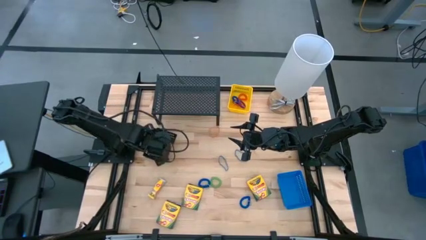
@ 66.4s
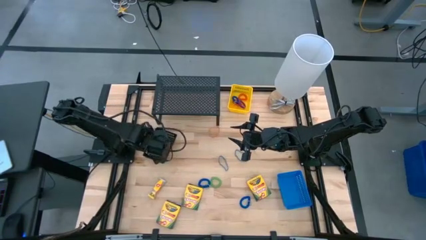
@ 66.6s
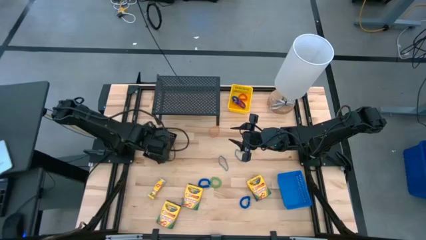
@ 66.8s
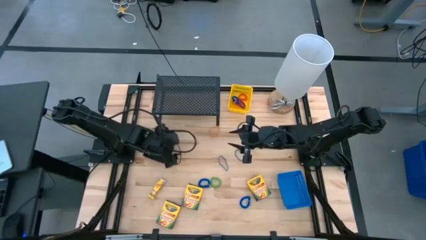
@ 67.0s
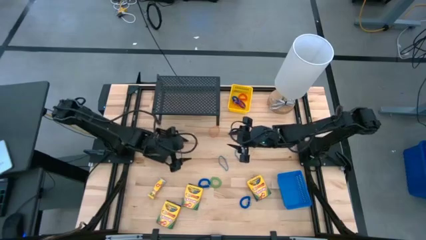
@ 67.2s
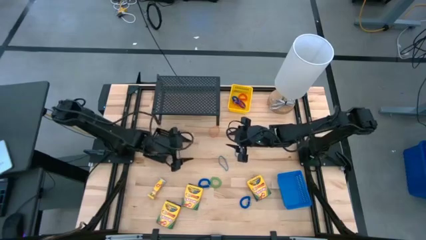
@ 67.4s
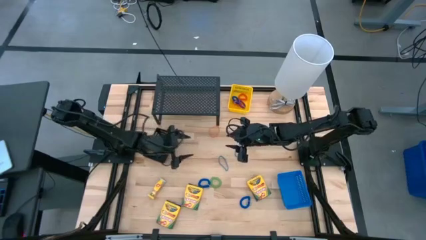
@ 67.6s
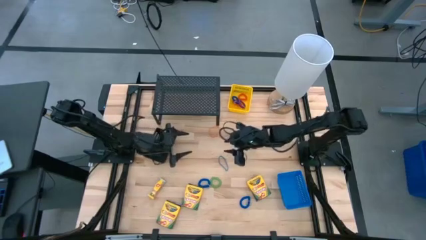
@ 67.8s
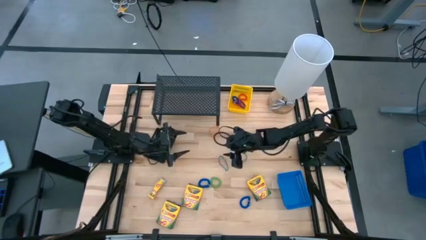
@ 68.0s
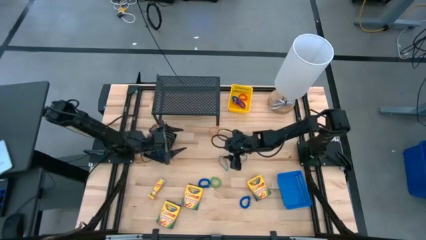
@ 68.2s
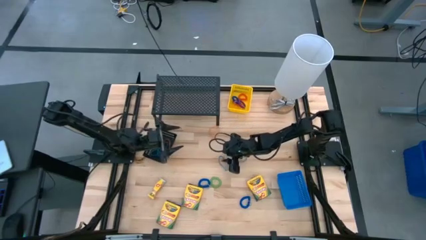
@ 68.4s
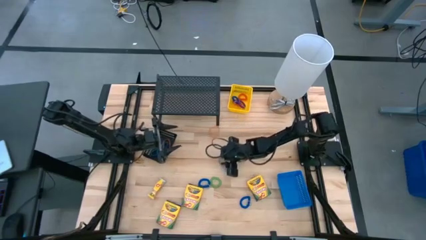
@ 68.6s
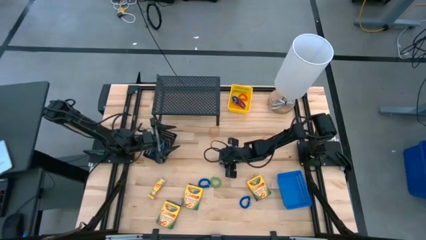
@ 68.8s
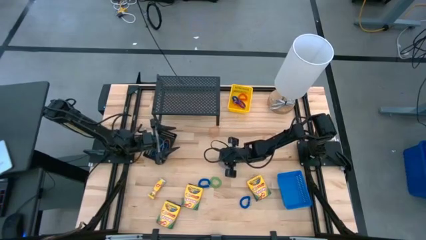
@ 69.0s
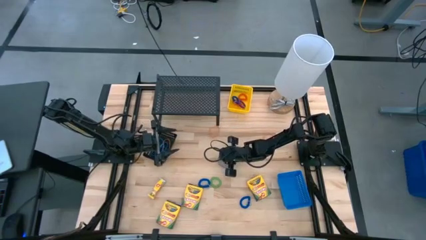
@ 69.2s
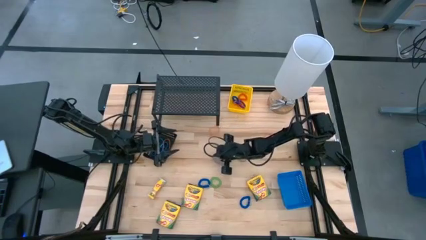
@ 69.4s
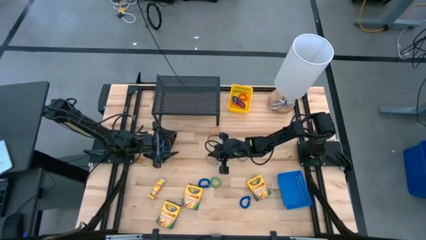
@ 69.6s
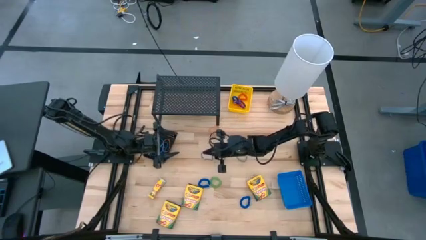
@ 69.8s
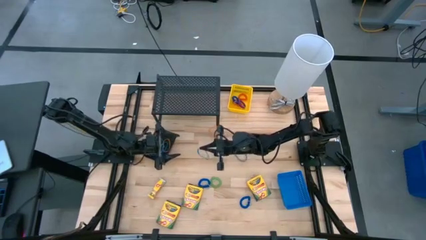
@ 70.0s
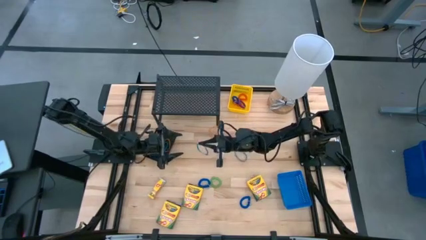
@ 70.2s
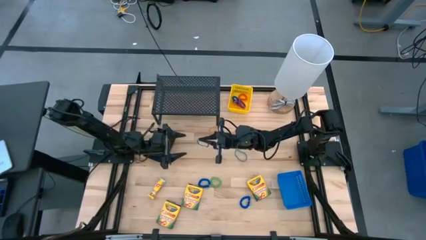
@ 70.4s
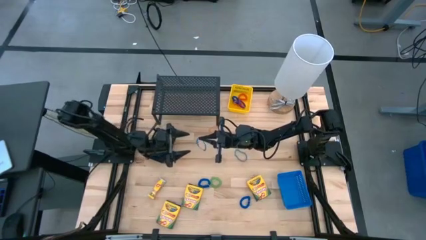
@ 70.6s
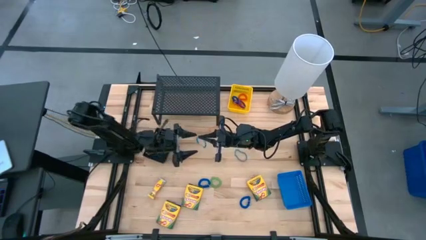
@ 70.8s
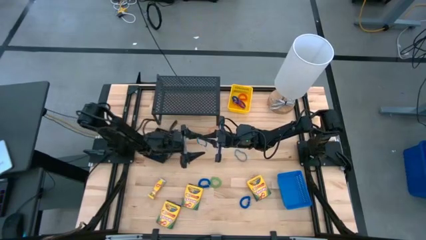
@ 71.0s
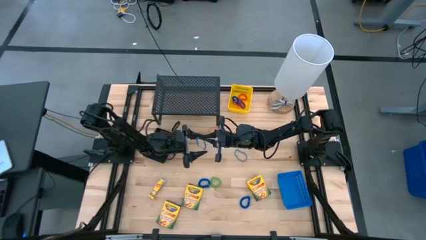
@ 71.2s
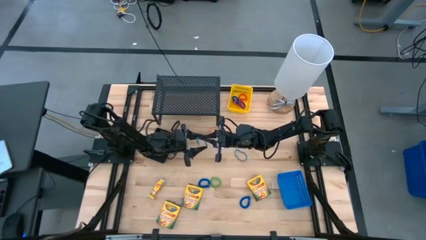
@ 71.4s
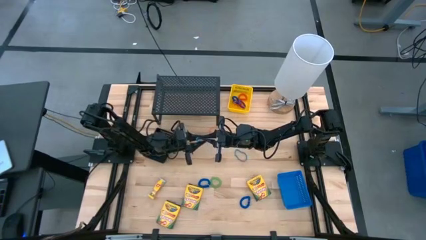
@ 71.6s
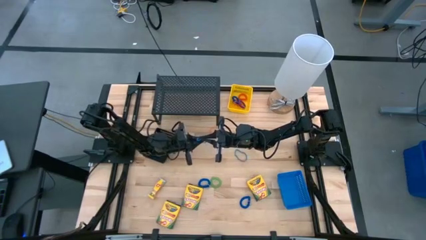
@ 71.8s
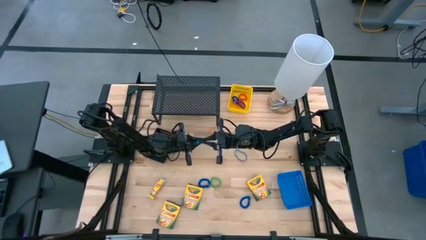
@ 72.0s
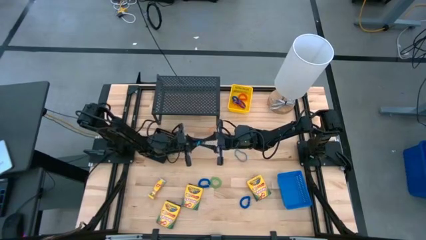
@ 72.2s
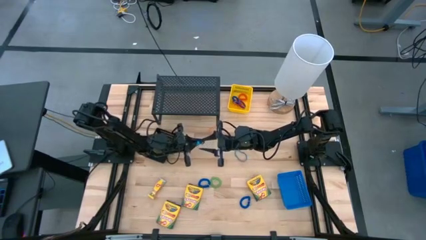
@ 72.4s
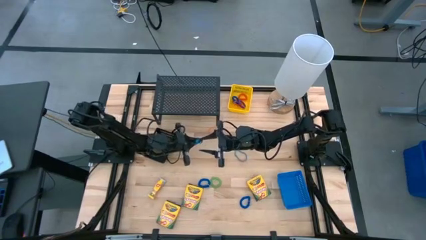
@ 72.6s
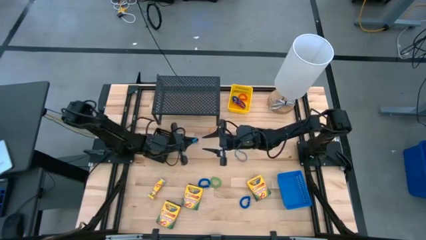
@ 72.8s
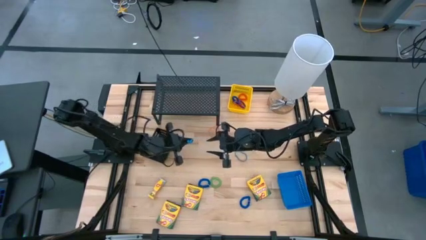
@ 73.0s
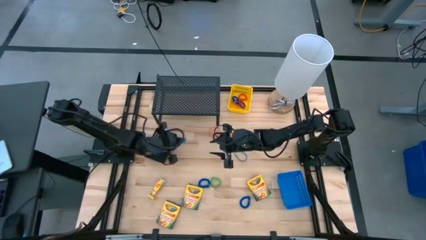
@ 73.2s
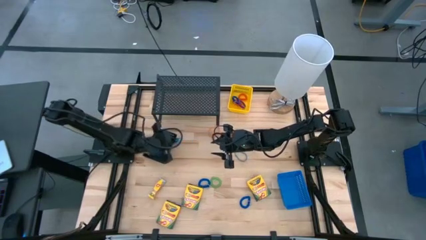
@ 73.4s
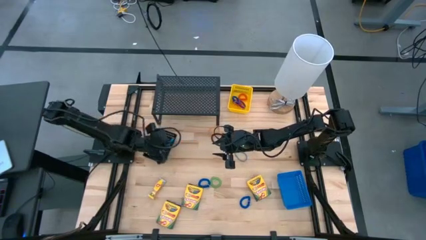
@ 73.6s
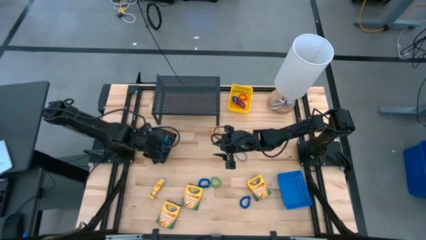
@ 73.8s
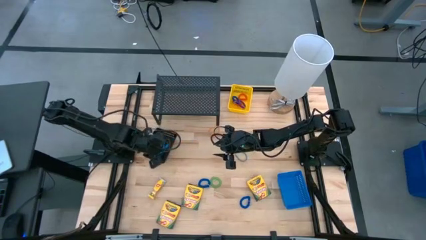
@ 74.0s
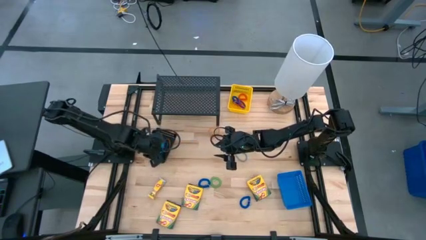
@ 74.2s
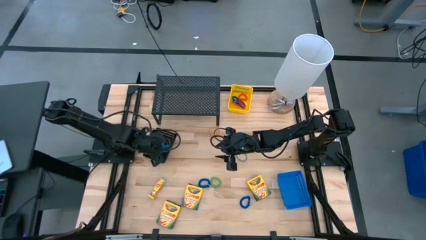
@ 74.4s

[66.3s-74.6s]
Task: Pick & Place Office Desk Supplies
Put the bottom blue rubber band into the black bin

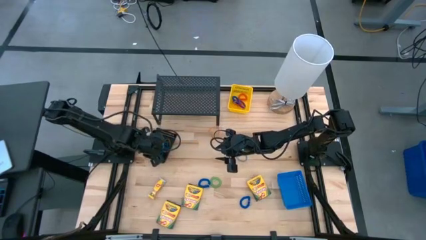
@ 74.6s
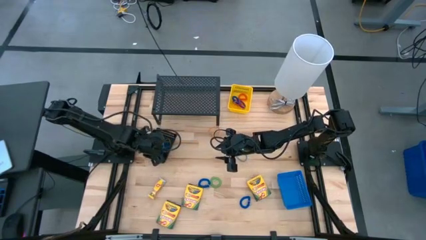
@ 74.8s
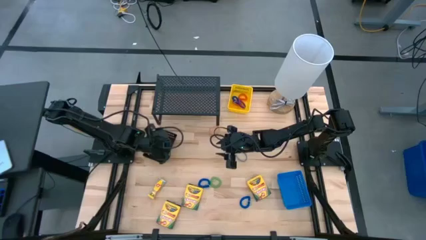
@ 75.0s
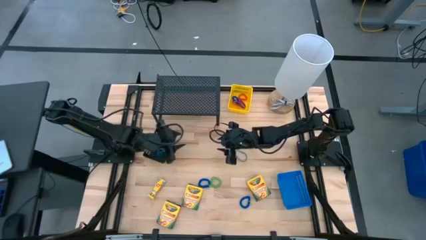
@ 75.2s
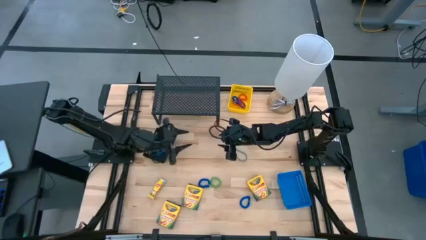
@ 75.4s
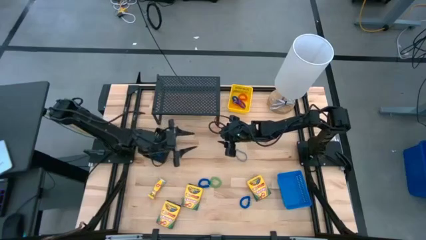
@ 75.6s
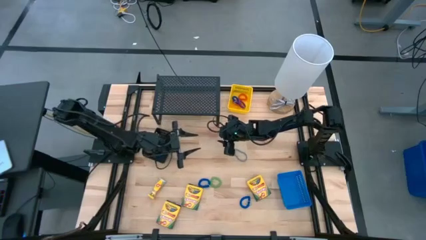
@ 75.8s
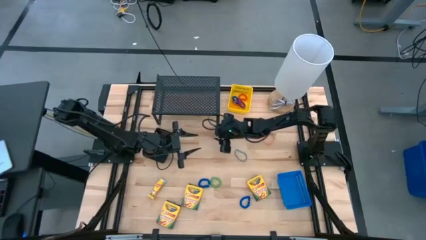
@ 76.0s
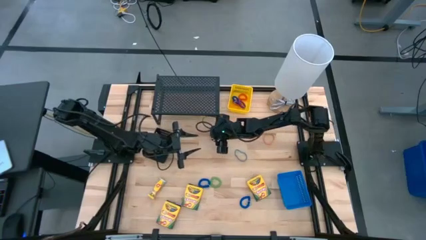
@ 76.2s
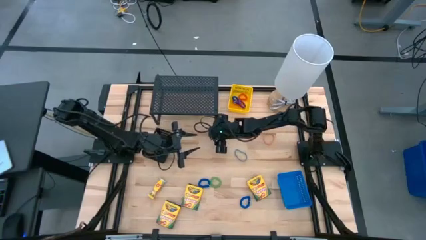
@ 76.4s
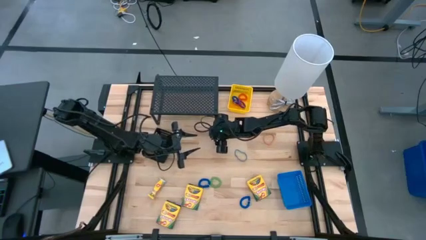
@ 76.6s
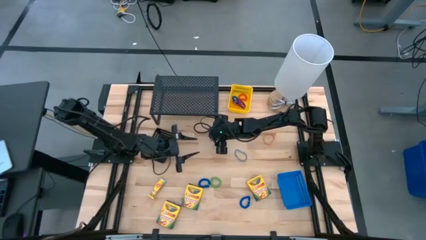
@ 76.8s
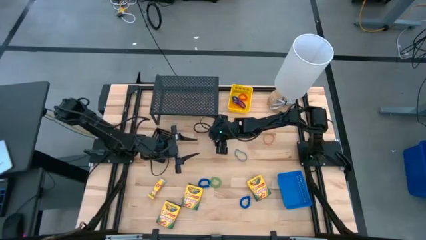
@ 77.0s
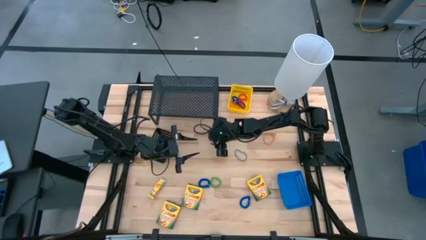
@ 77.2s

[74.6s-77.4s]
Put the left orange rubber band into the black bin

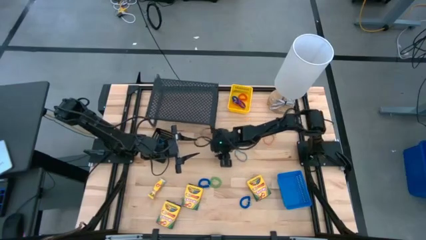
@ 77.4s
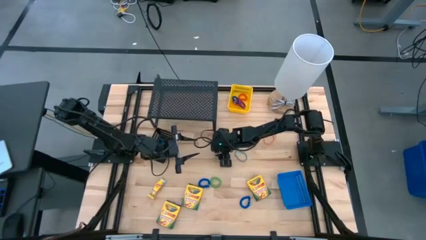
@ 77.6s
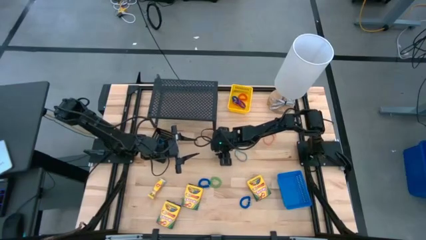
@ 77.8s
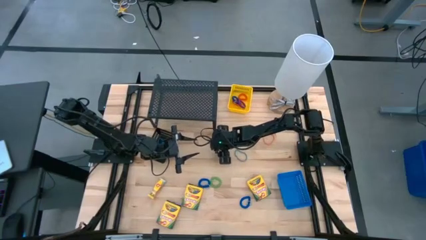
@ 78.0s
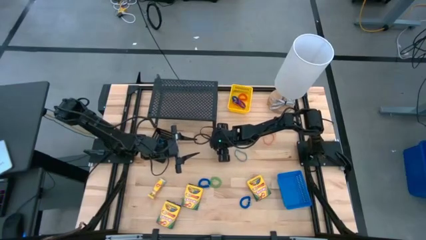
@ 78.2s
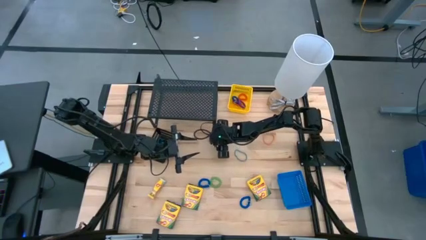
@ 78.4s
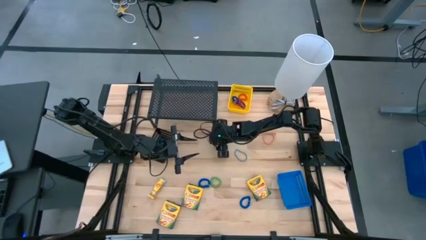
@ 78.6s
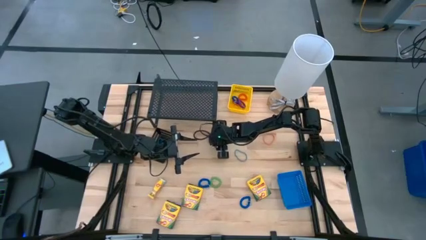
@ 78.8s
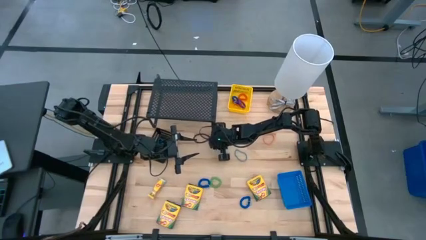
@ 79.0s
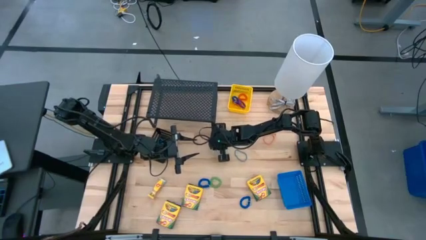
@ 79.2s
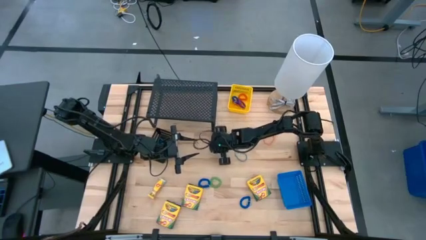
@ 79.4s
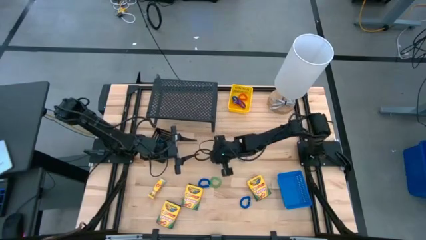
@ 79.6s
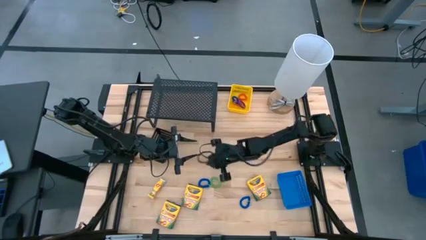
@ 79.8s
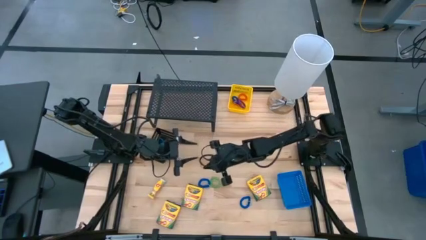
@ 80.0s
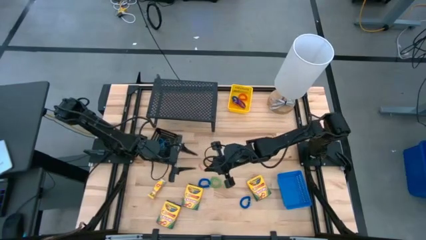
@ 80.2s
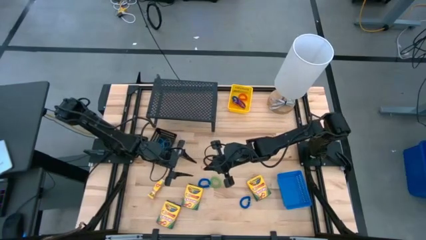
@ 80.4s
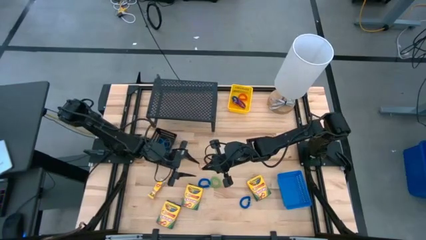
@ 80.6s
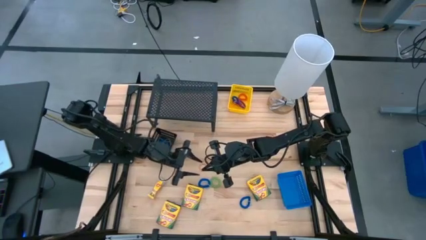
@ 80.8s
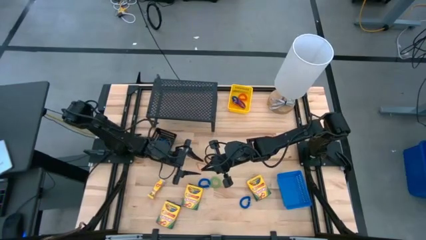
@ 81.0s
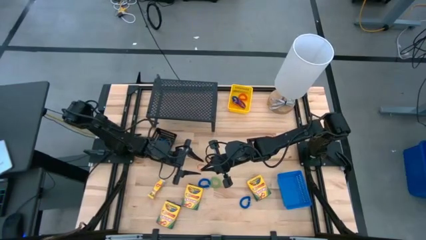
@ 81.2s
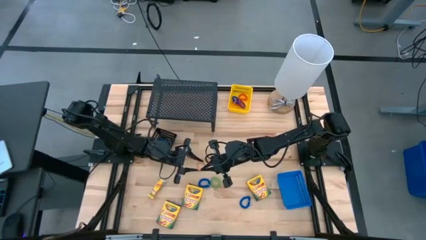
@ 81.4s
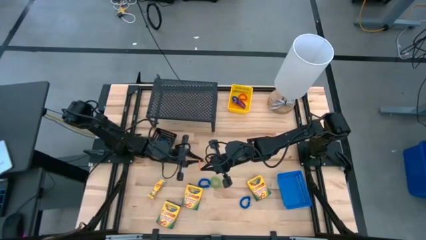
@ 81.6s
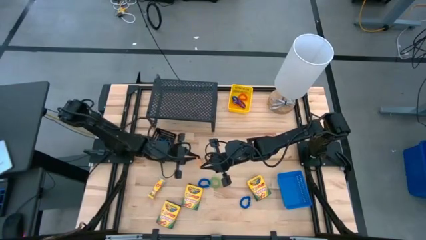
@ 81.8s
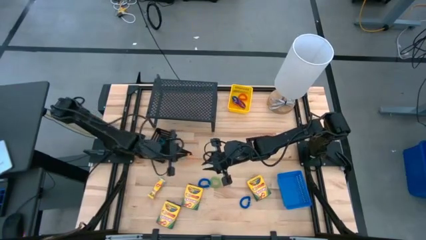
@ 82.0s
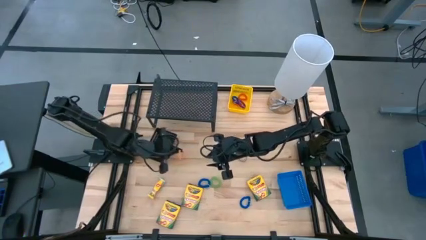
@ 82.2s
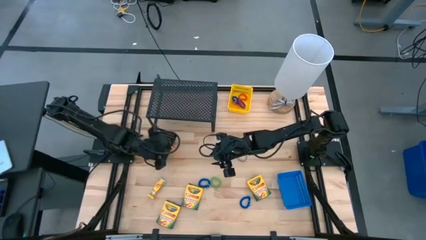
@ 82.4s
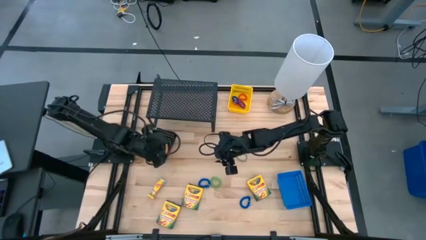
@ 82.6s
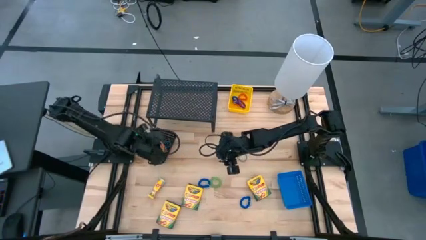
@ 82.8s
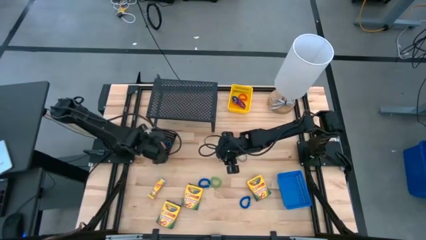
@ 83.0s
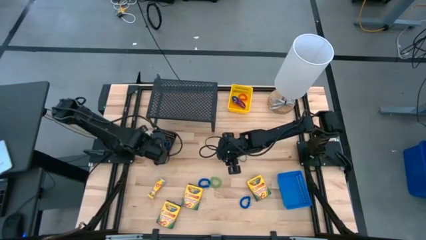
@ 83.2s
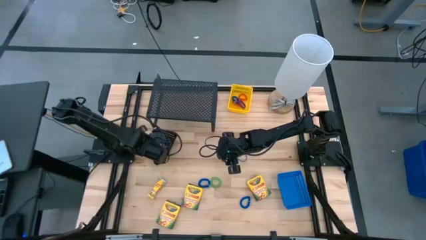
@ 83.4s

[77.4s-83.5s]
Put the left orange rubber band into the black bin
